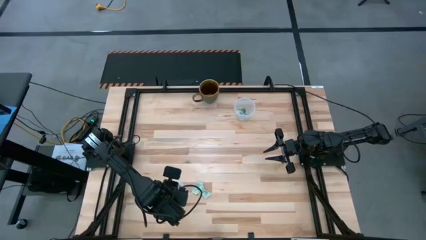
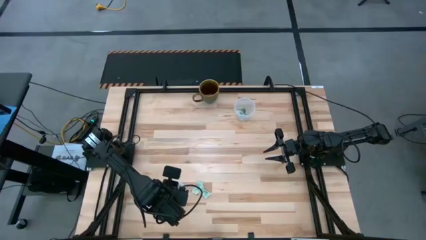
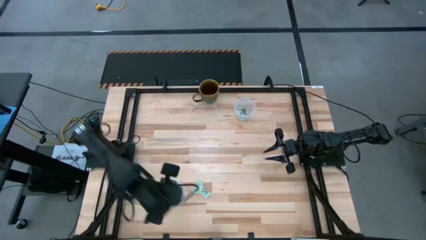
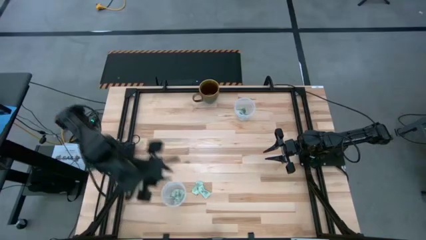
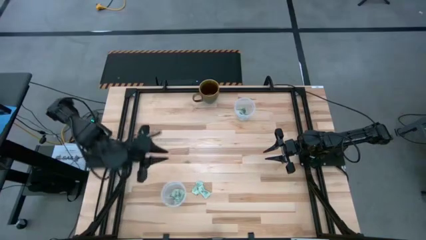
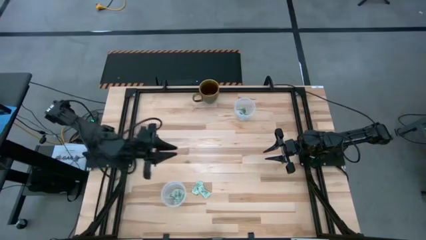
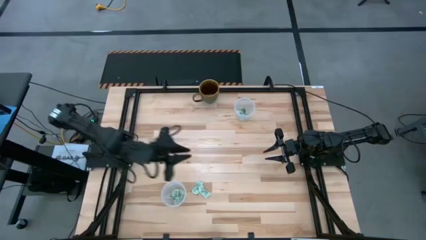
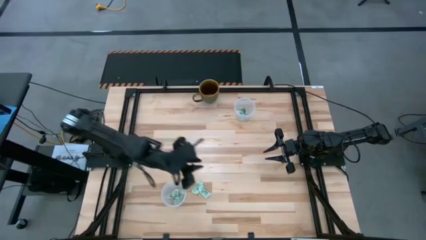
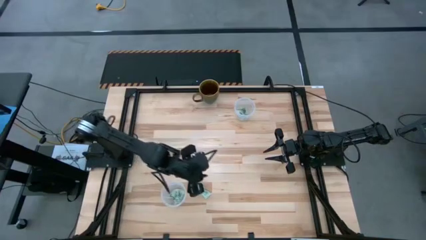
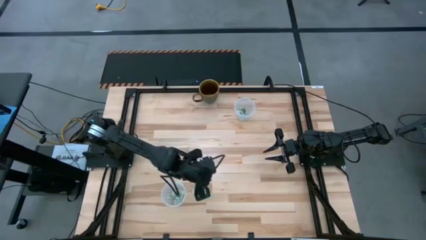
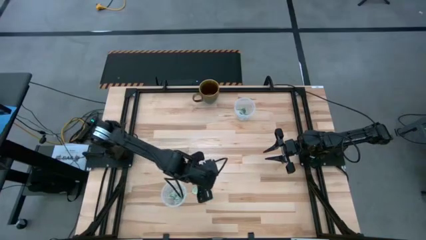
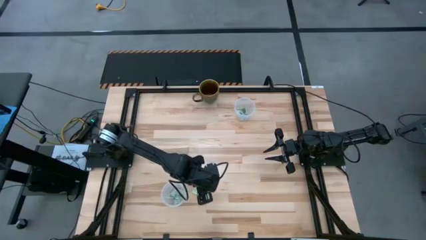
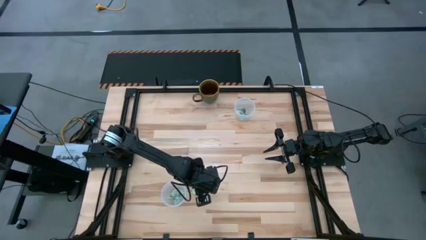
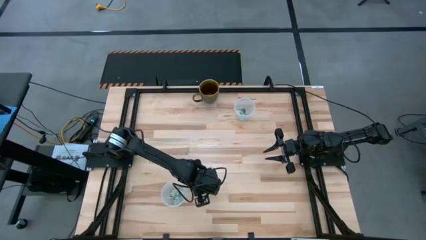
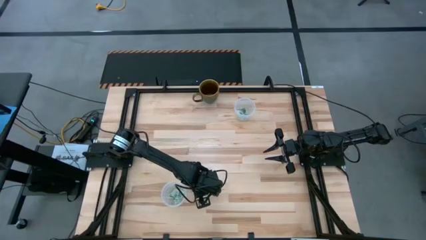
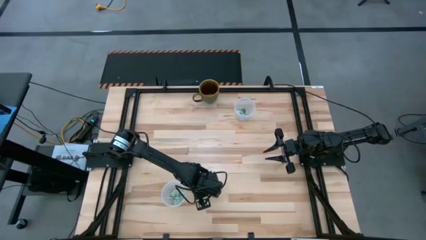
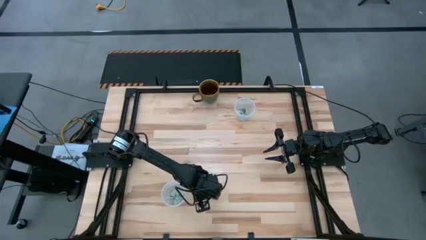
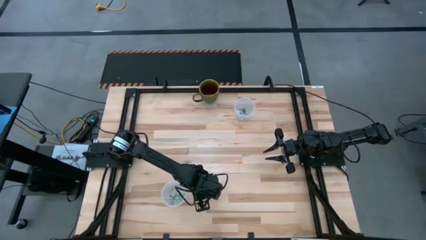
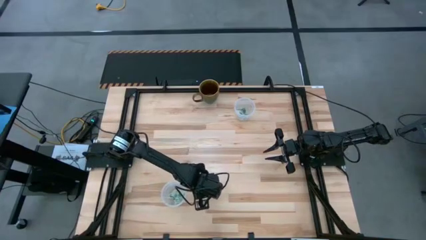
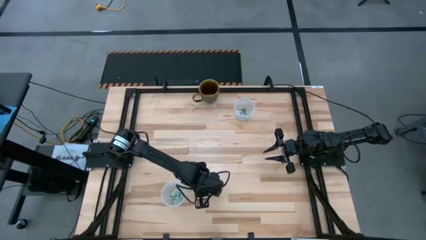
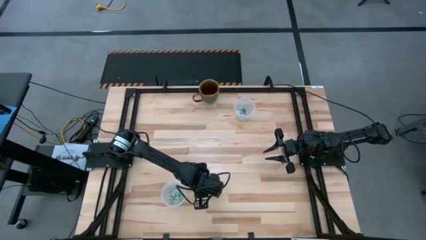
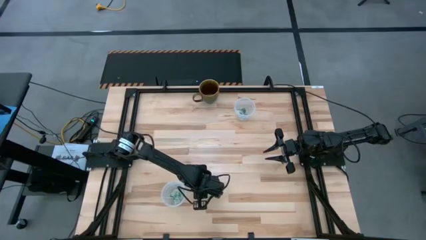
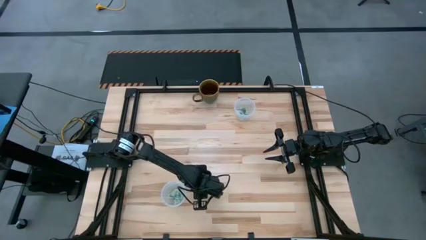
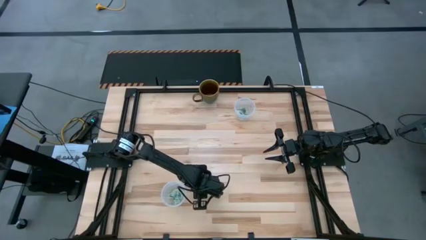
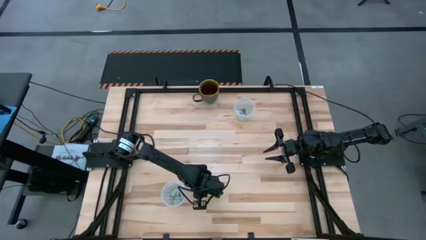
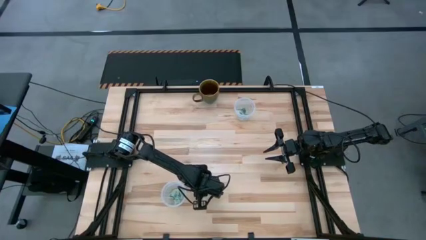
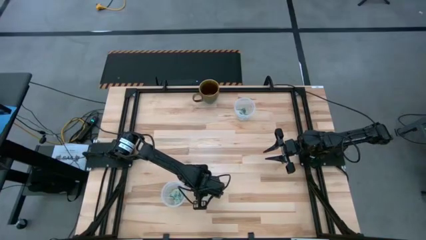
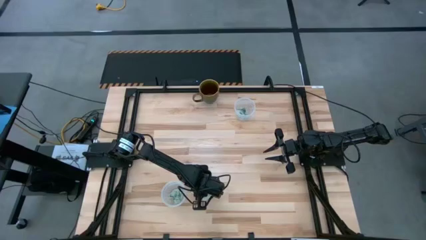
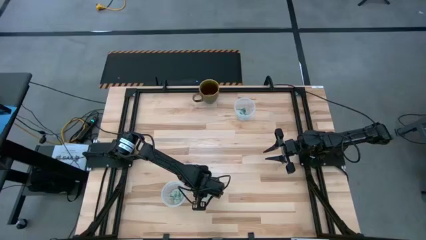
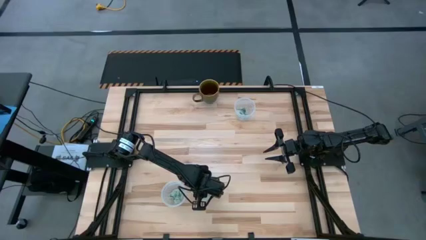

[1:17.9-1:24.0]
Task: Pick and place items into bin
Put the right stevia packet into the bottom transparent bin

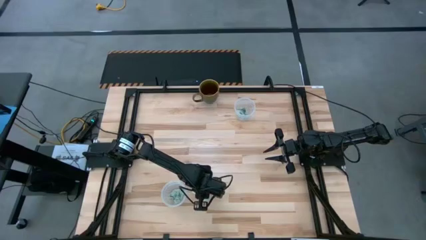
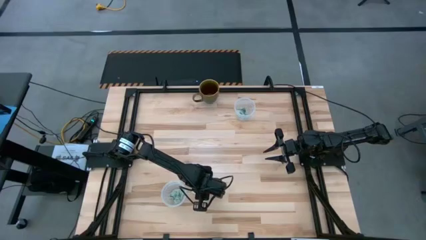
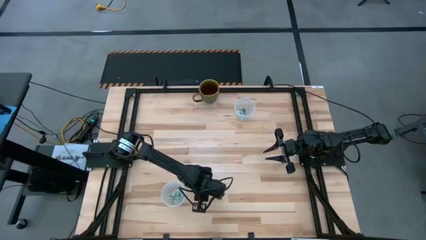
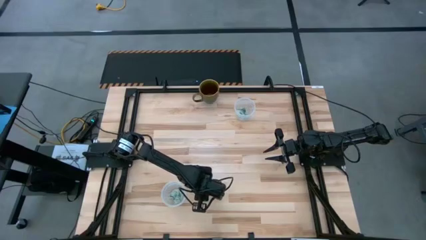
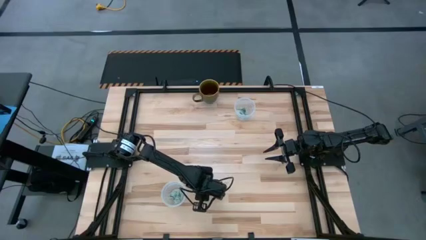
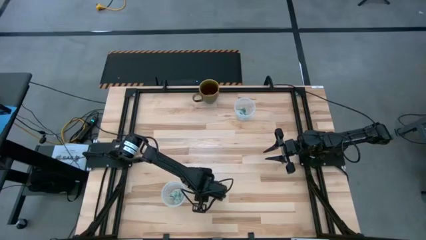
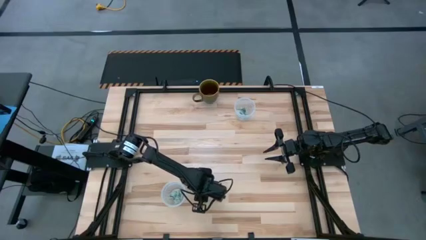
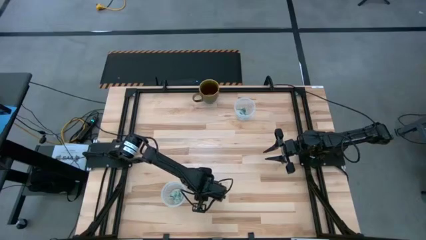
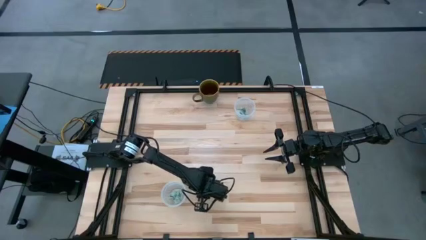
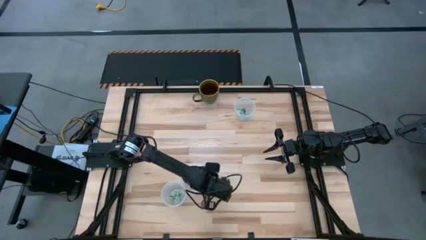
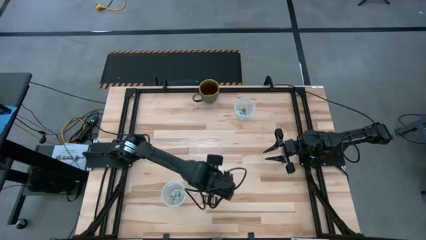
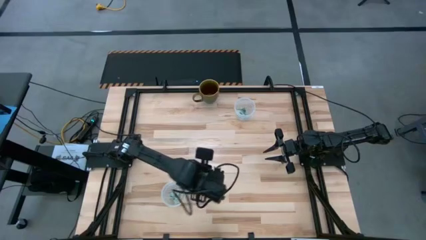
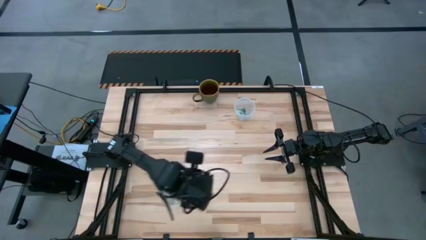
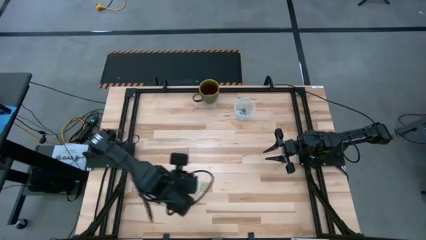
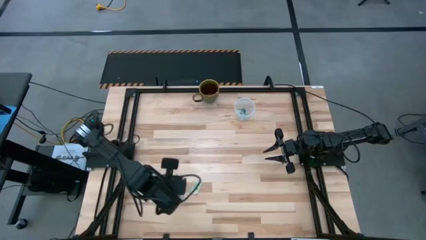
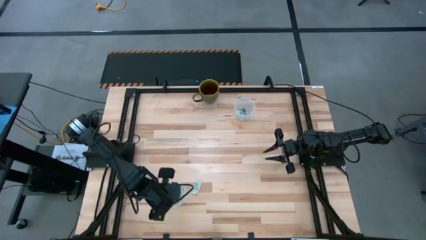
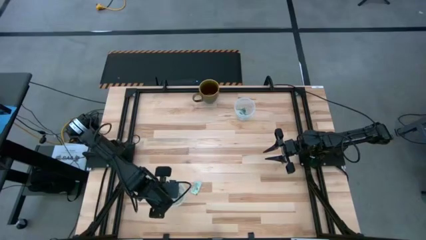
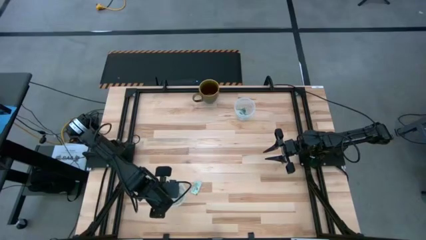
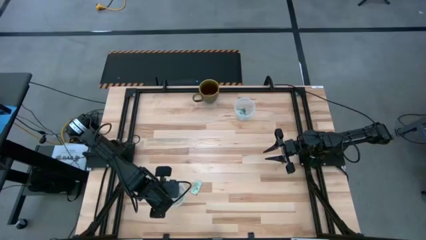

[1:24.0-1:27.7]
Put the right stevia packet into the bottom transparent bin

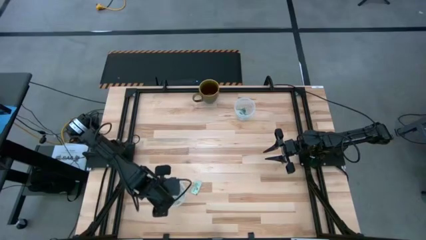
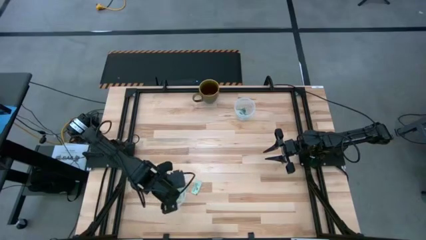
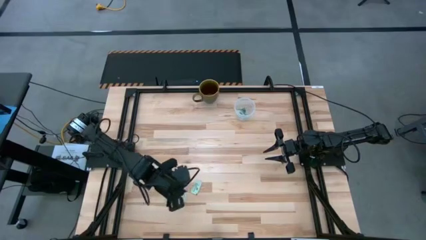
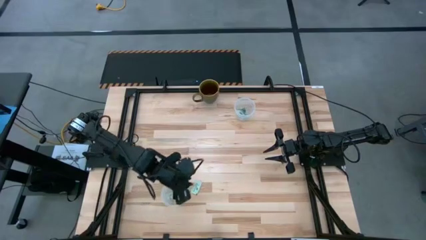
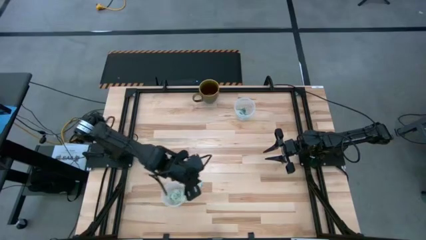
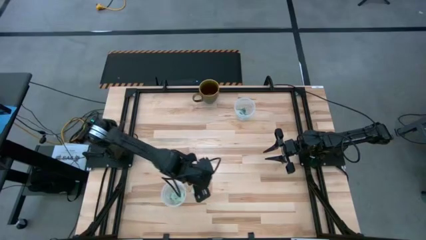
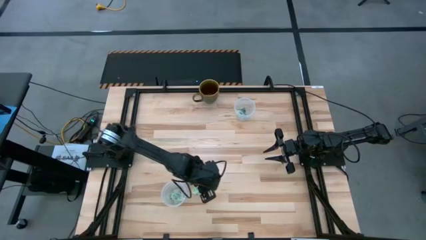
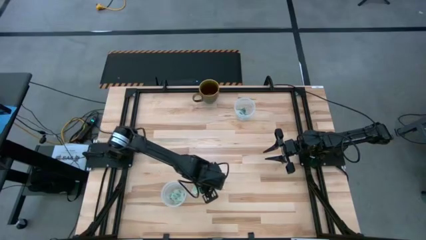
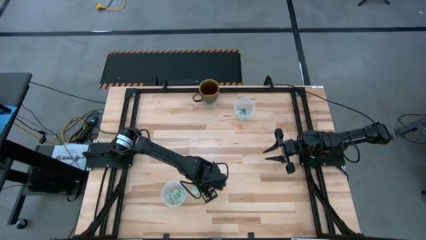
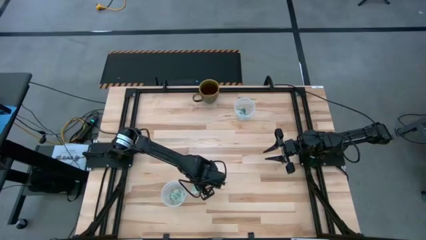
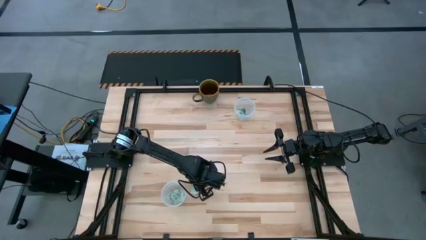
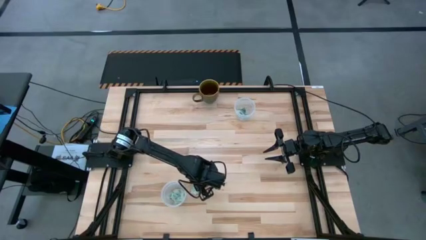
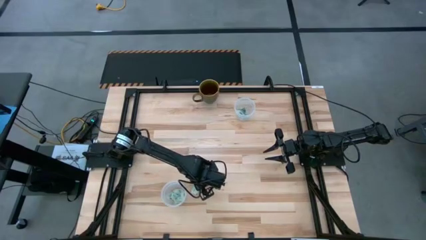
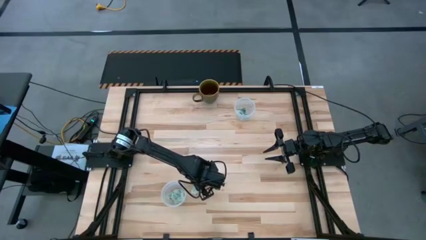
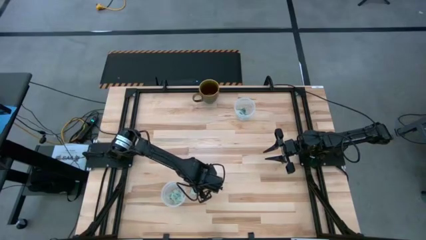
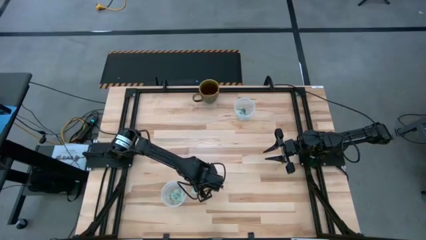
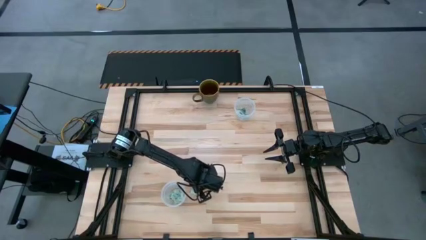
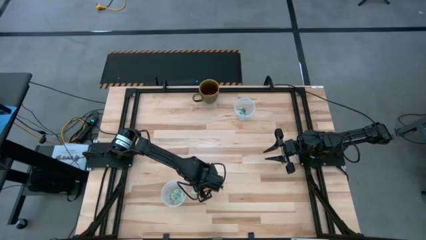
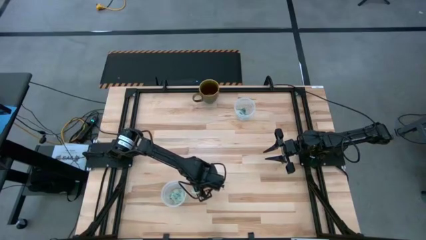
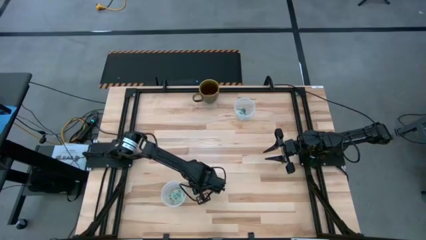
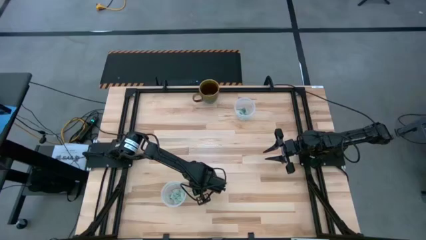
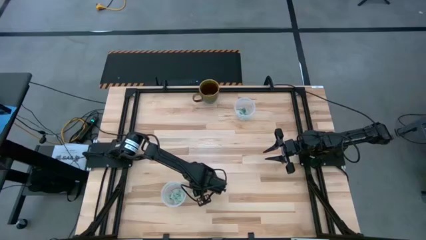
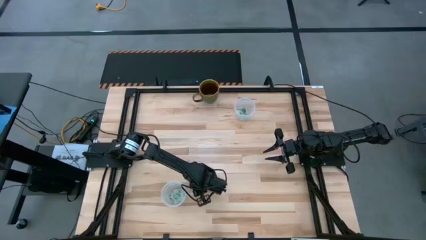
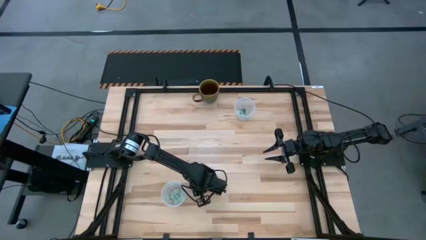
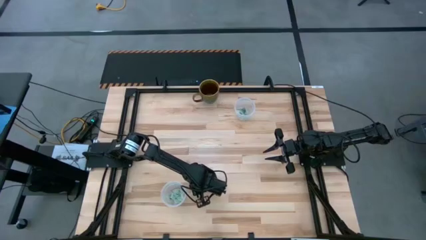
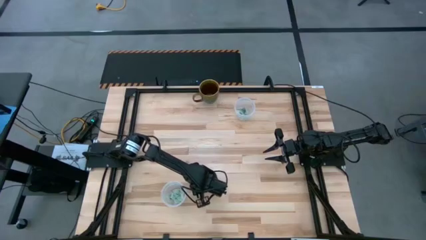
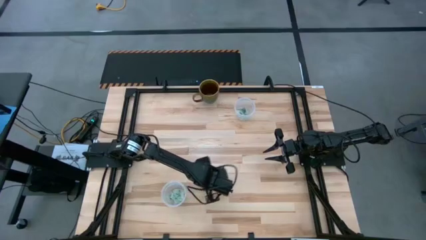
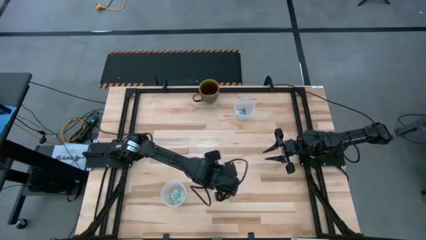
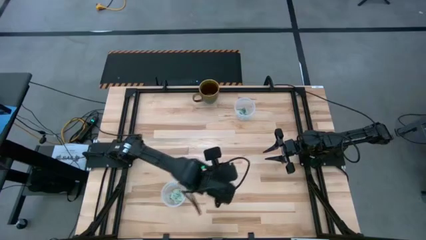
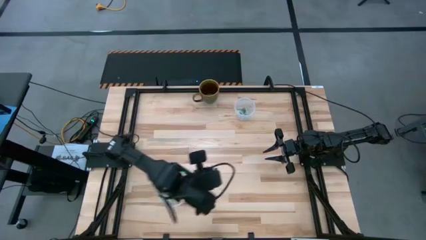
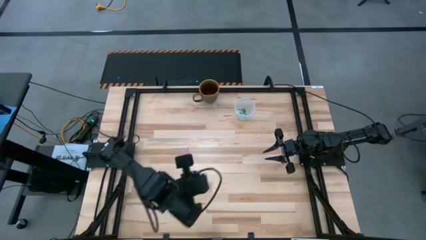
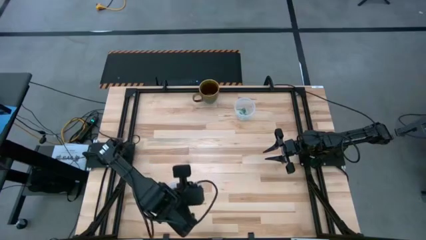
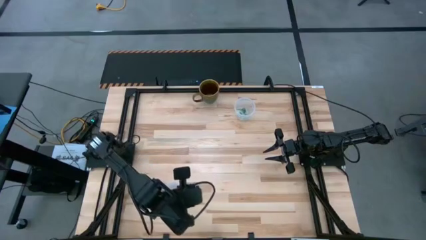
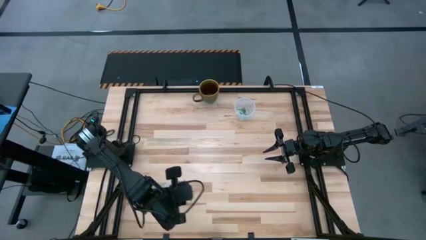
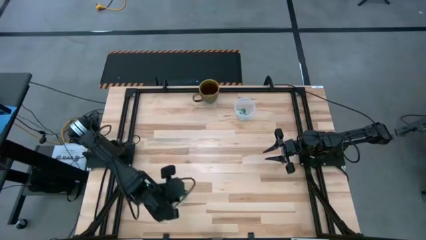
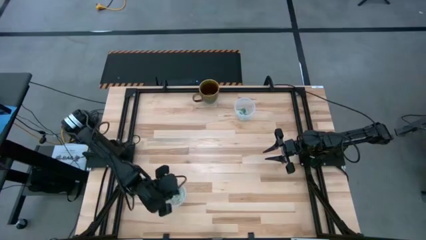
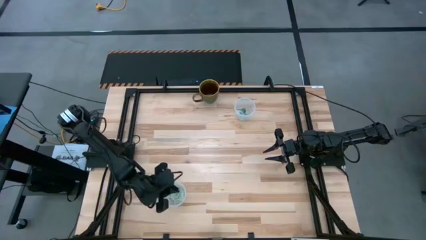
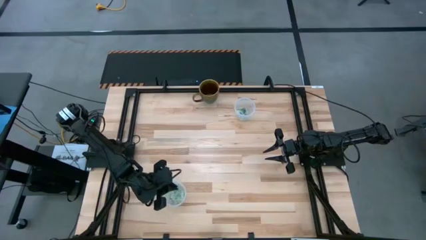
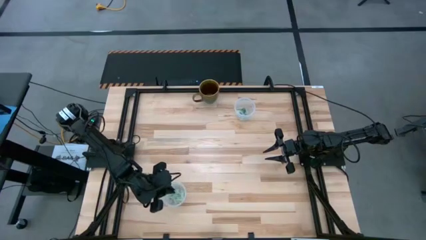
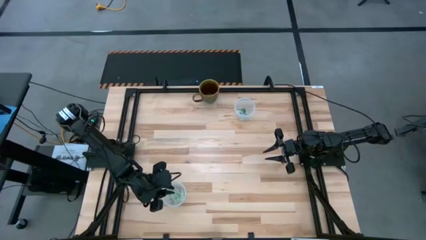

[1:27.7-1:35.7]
Put the stevia packet into the bottom transparent bin
